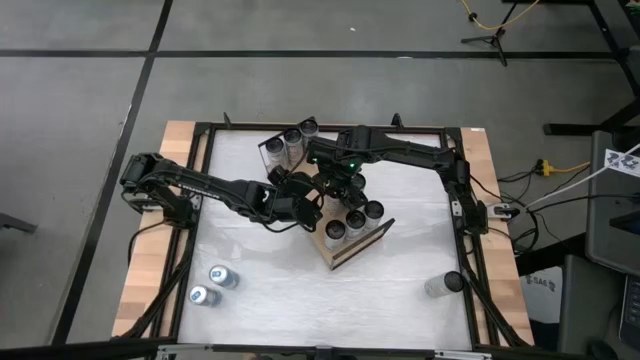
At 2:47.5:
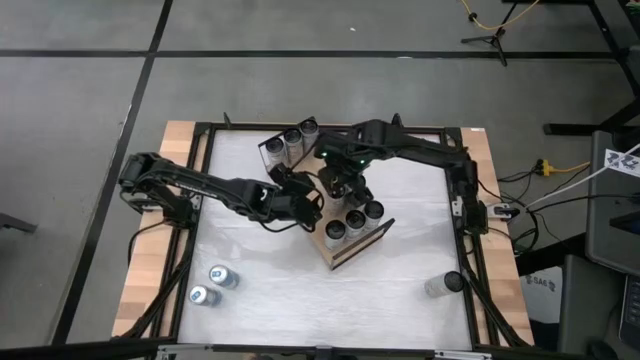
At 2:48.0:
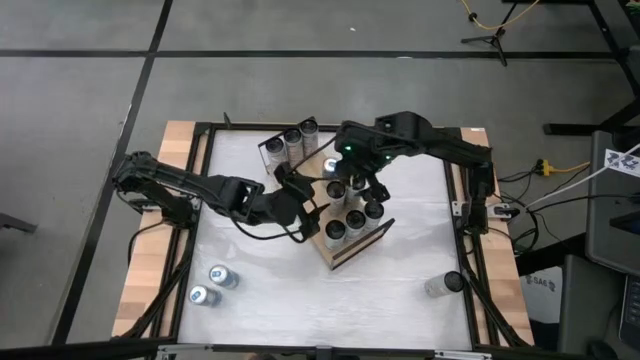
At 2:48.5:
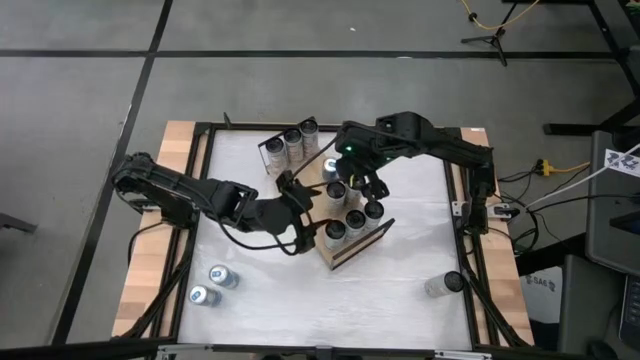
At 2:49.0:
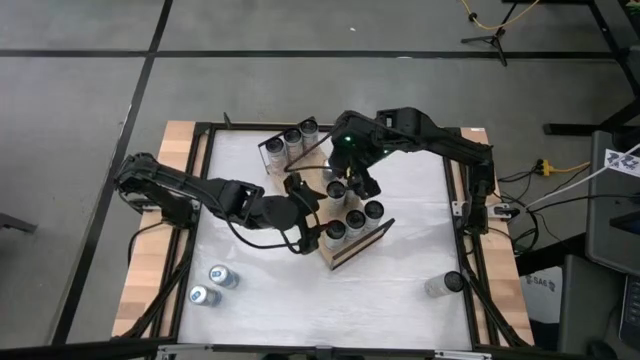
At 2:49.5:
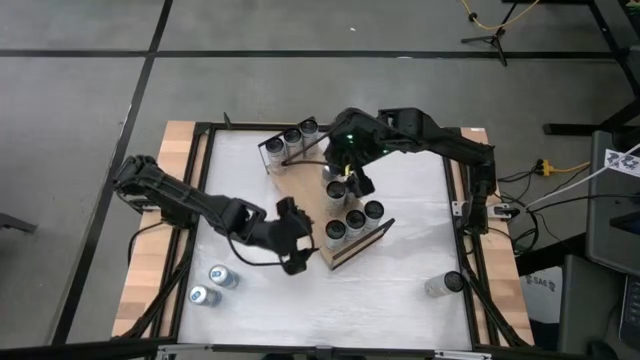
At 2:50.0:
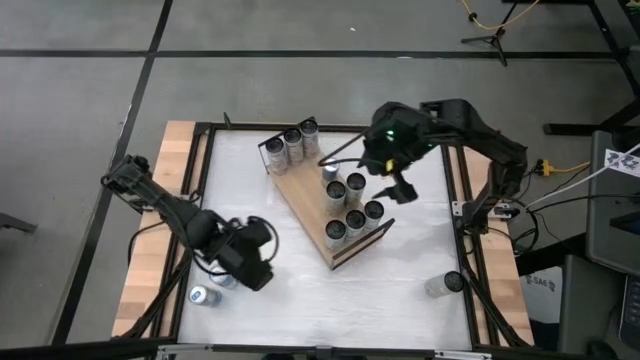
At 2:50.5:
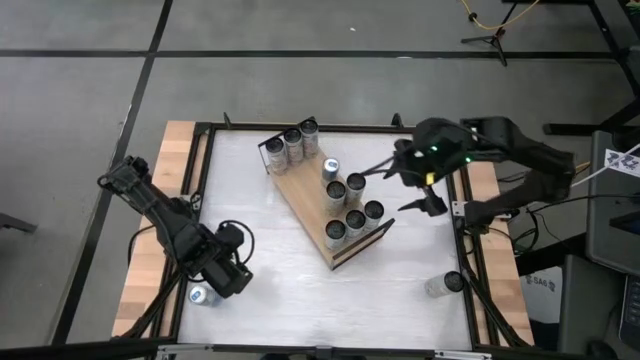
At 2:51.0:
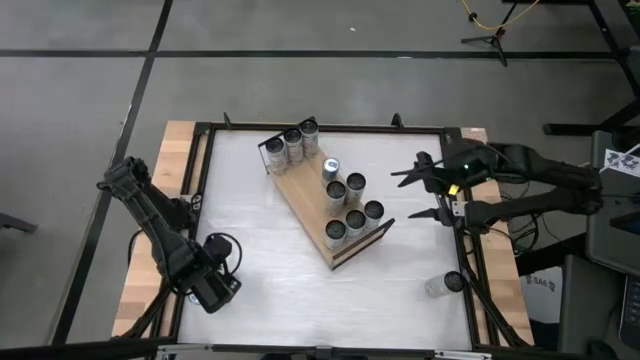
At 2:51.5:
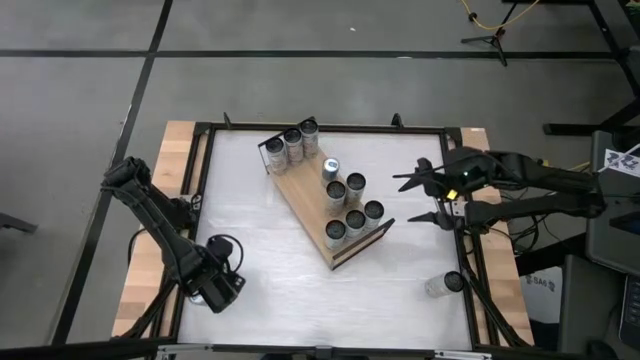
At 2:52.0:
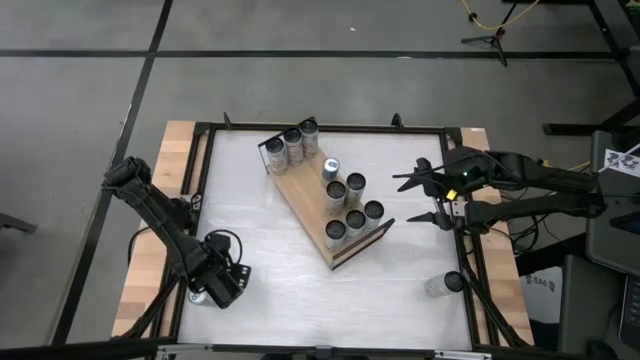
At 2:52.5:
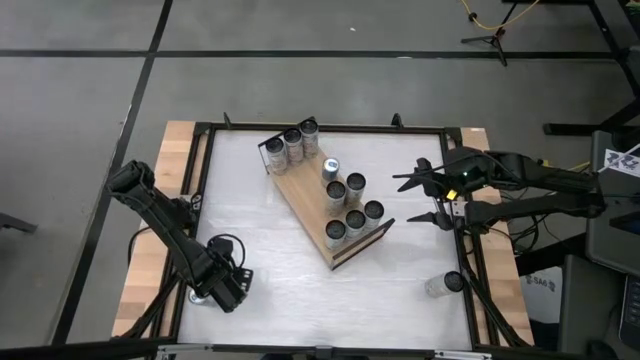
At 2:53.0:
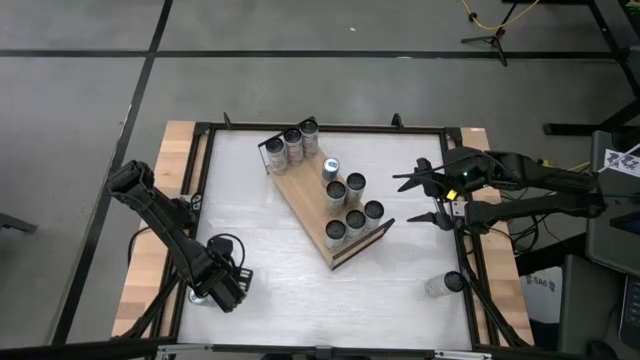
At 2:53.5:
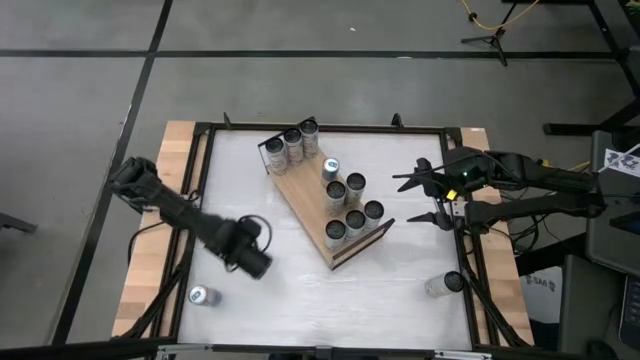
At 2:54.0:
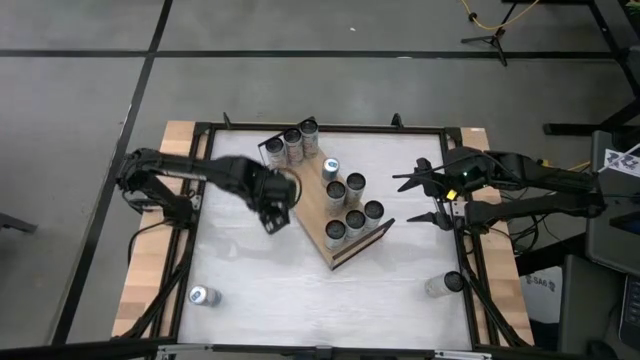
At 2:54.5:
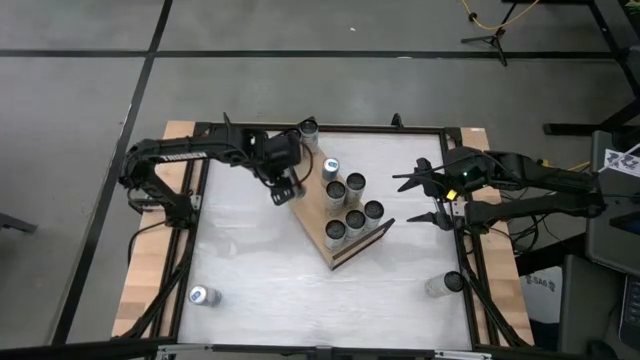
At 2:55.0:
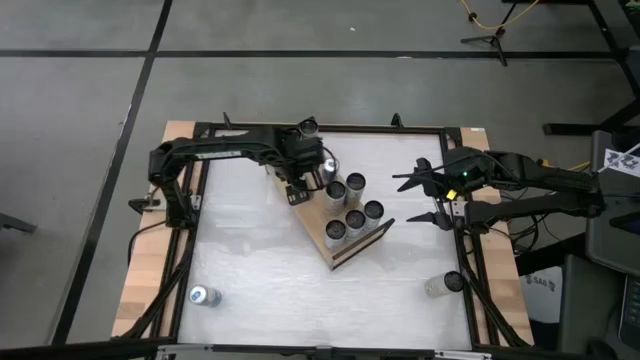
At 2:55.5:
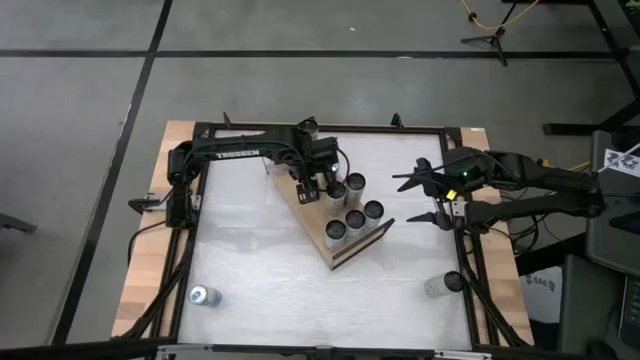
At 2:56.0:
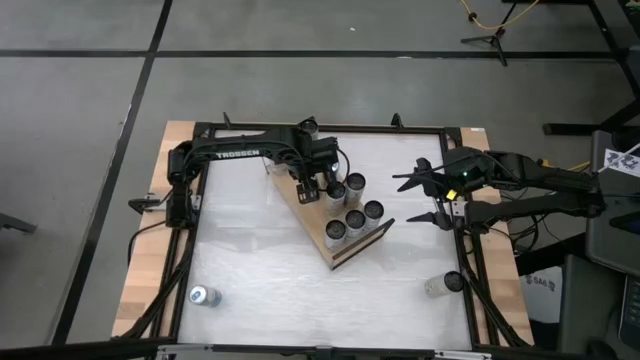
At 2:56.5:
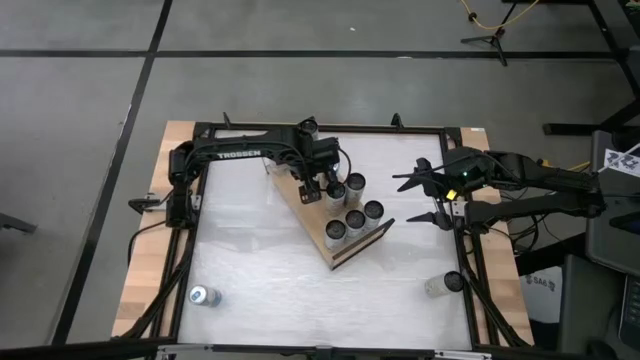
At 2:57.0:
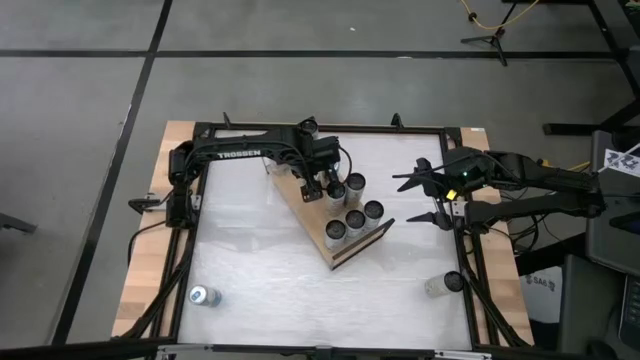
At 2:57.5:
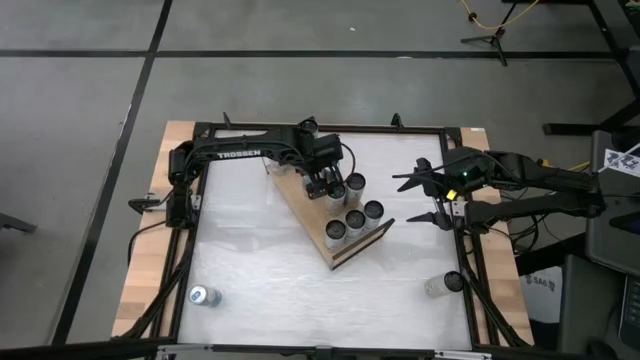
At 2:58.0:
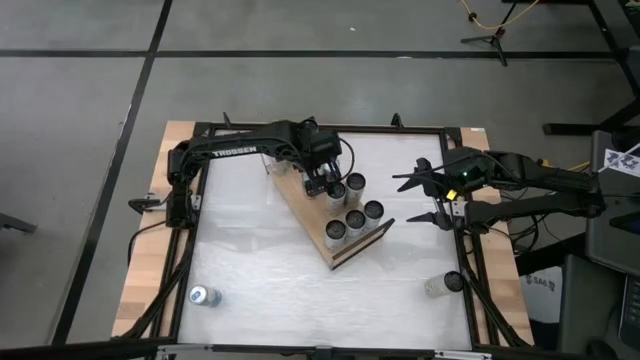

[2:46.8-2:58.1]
Task: Place canned beverage on shelf
Put the top blue soda can on the shelf and align with the other blue soda can

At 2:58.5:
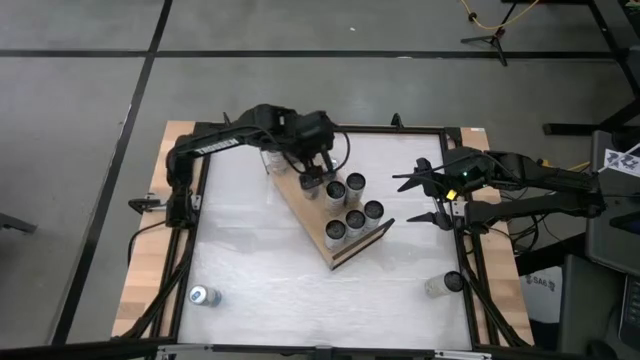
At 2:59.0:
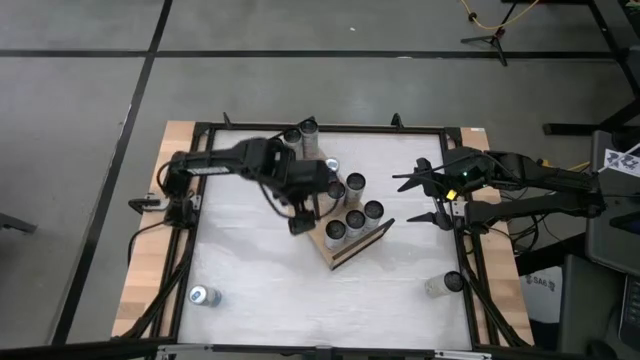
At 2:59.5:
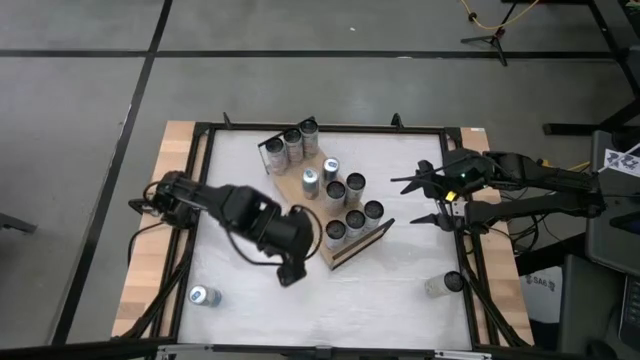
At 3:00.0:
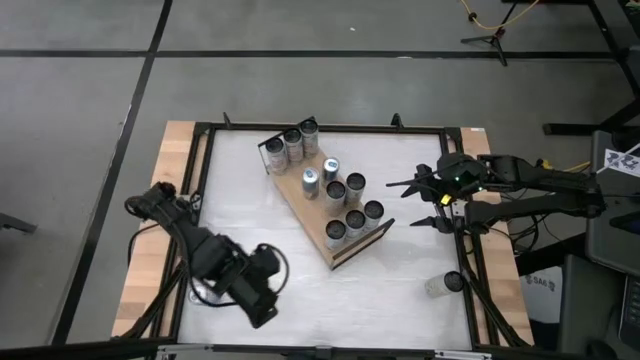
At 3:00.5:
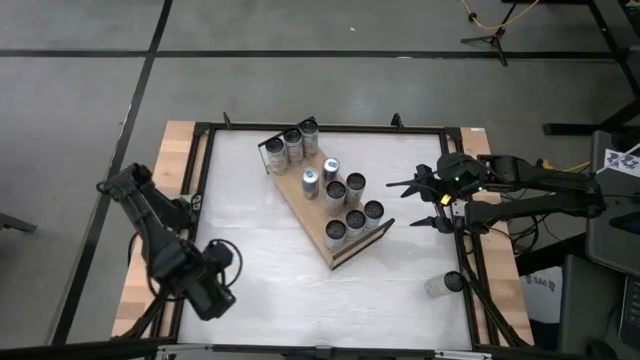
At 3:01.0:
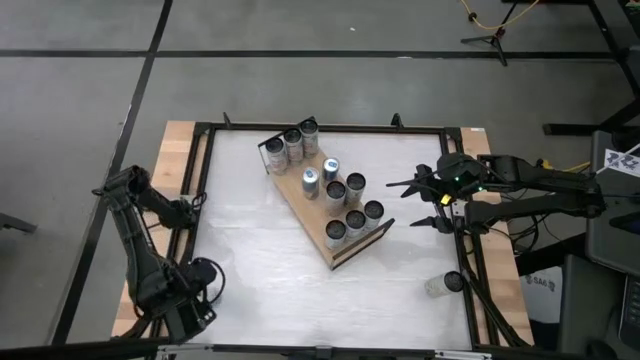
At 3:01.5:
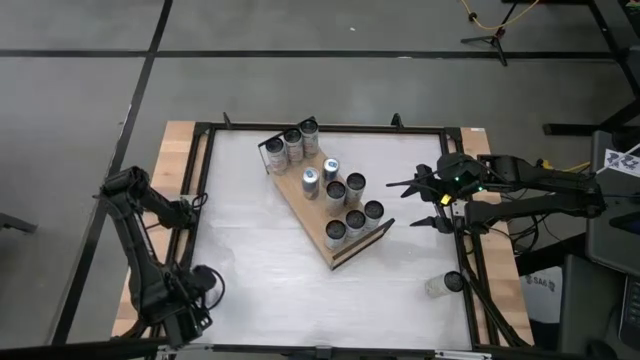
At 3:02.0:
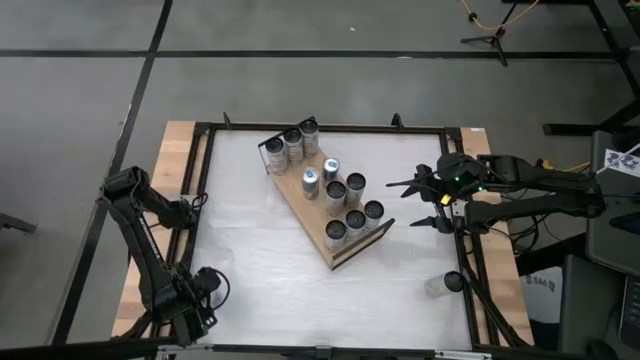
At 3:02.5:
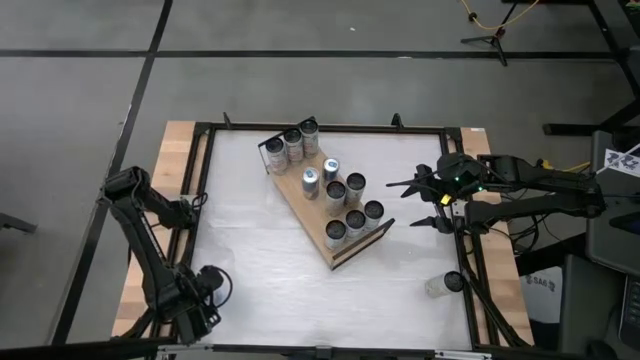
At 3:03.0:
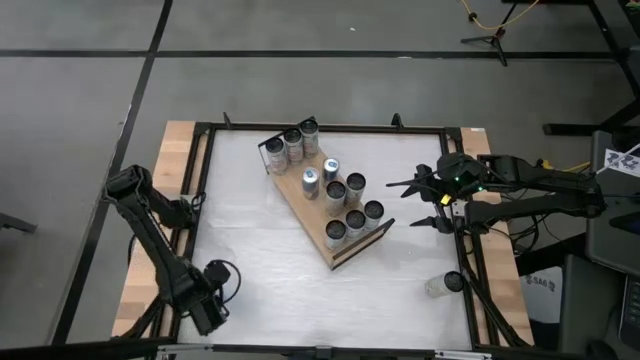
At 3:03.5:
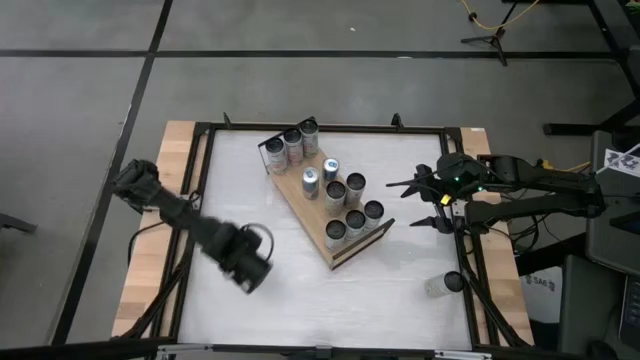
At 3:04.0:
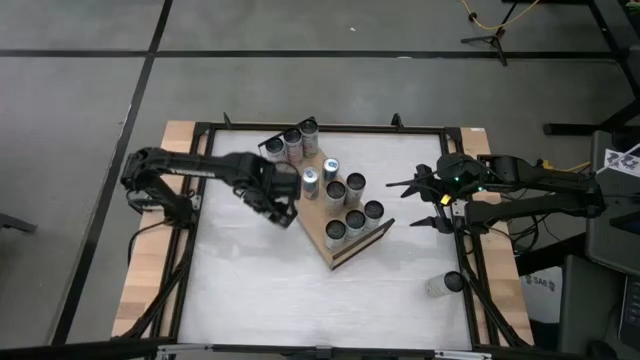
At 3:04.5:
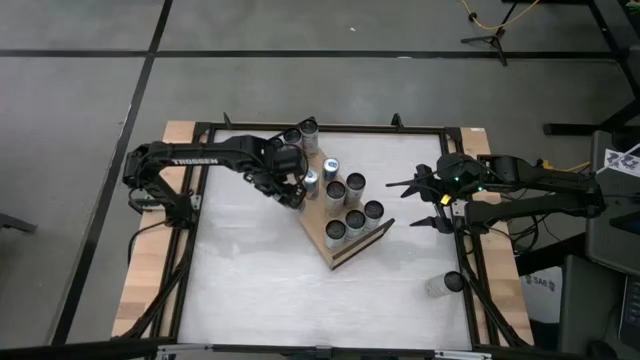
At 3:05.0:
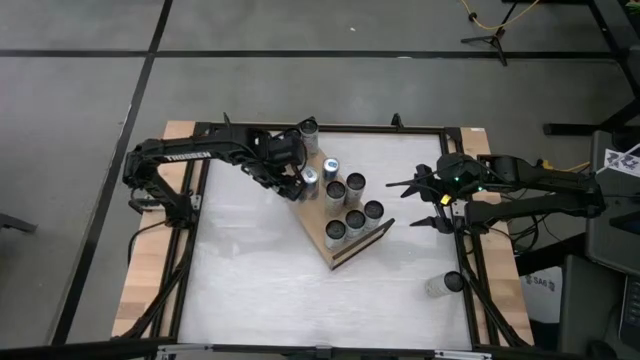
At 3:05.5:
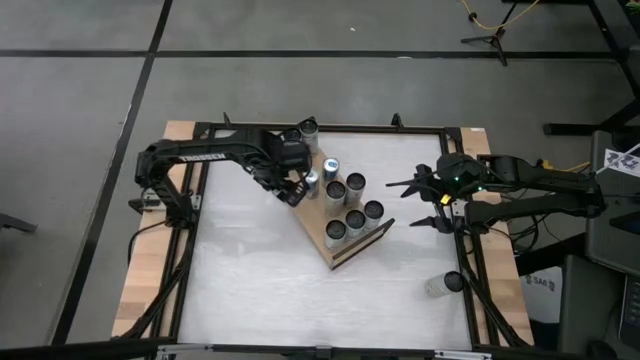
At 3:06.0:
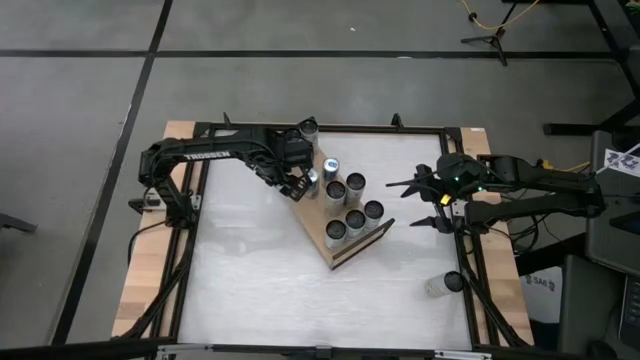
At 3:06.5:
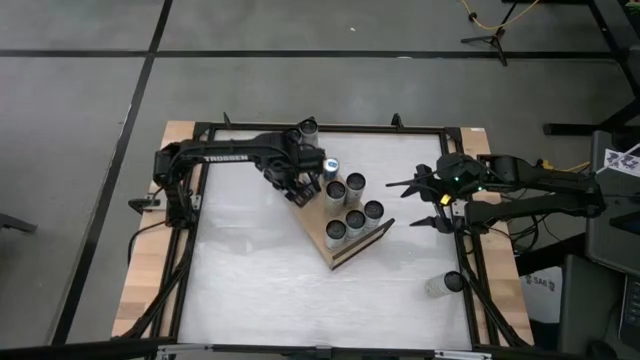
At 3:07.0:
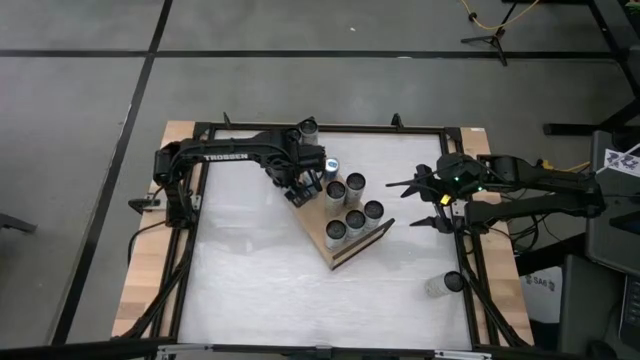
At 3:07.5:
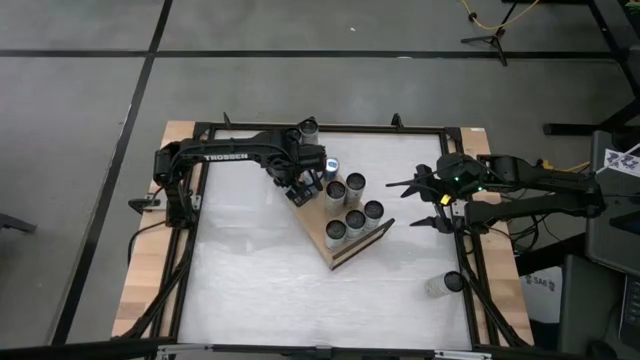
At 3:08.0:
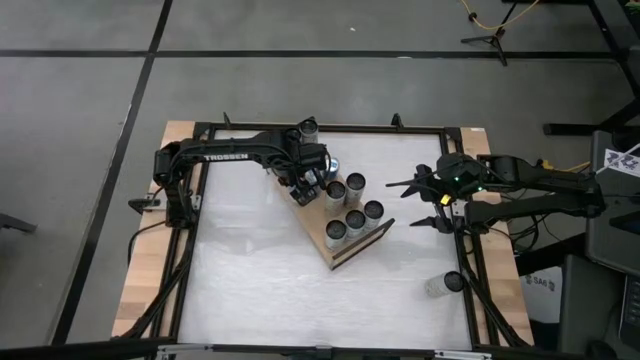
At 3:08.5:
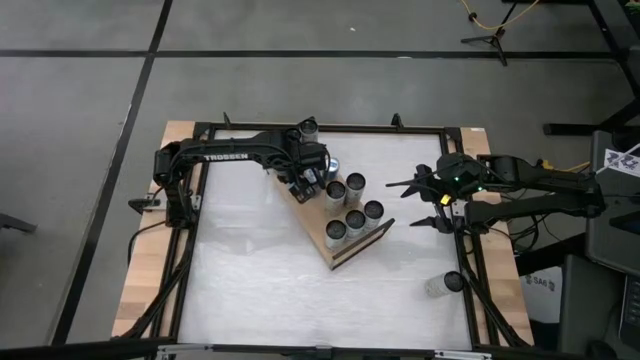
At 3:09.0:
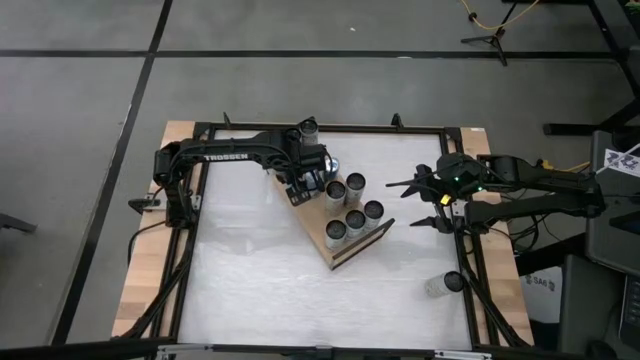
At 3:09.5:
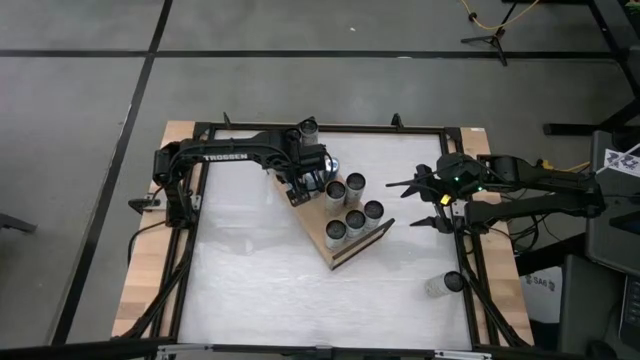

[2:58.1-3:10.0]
Put the blue soda can on the shelf and align with the other blue soda can
